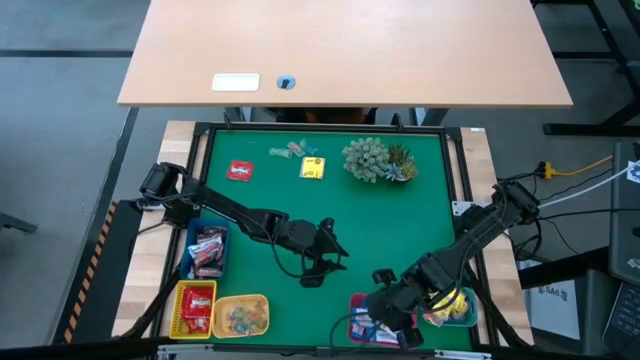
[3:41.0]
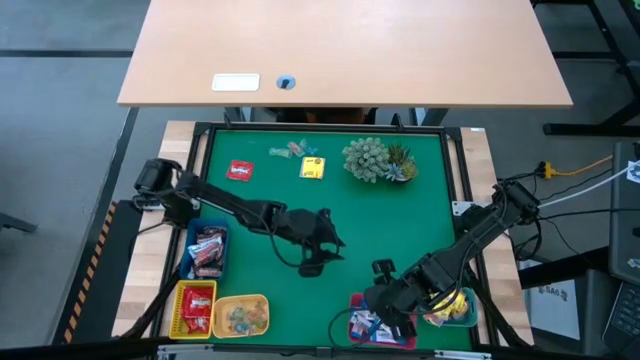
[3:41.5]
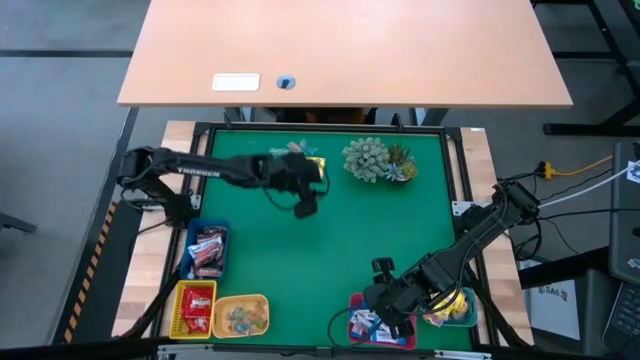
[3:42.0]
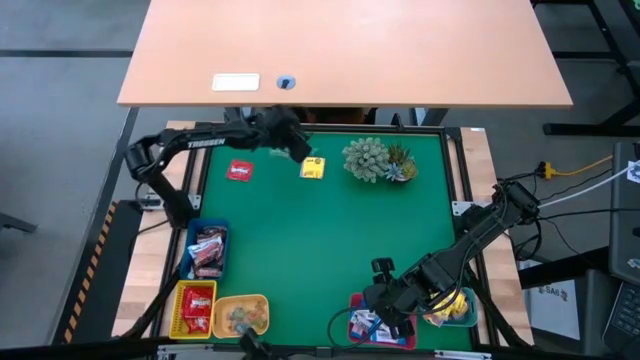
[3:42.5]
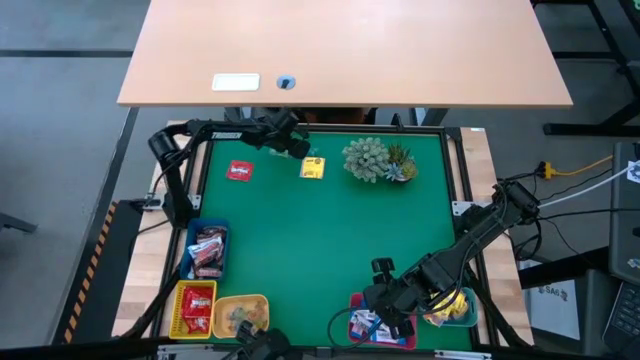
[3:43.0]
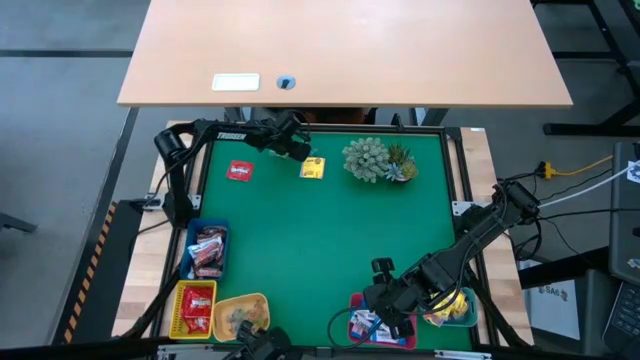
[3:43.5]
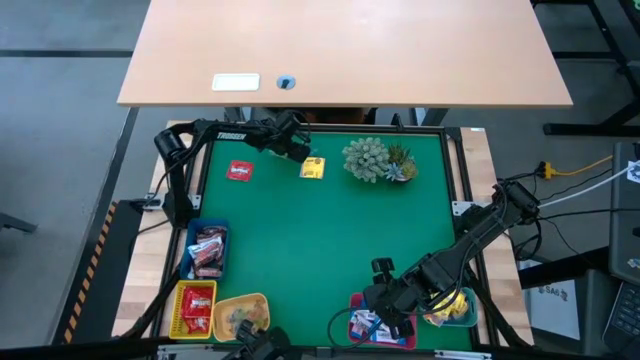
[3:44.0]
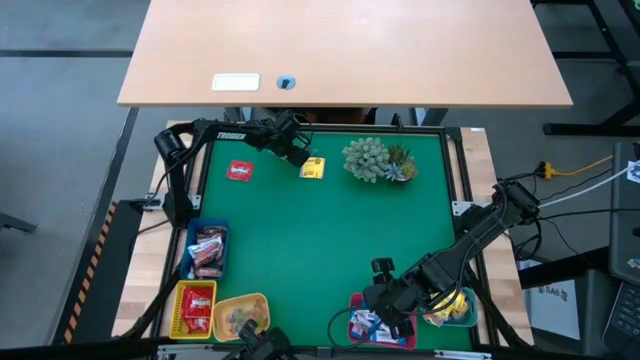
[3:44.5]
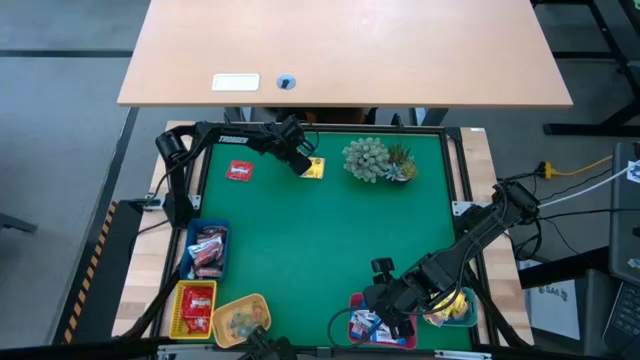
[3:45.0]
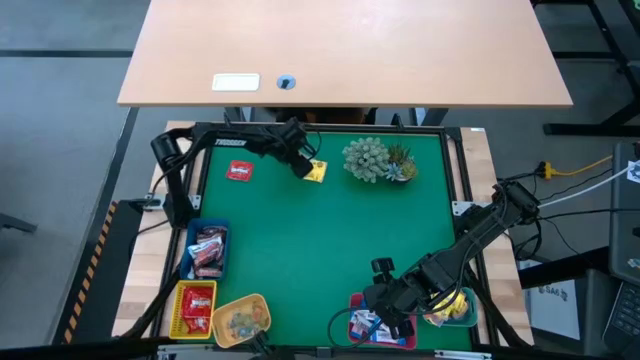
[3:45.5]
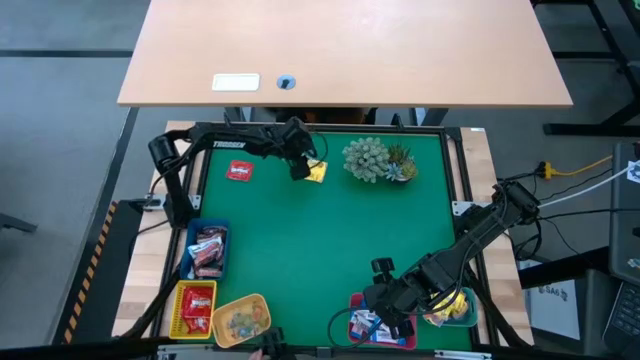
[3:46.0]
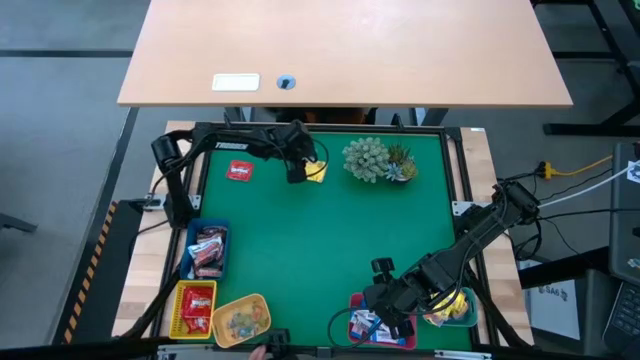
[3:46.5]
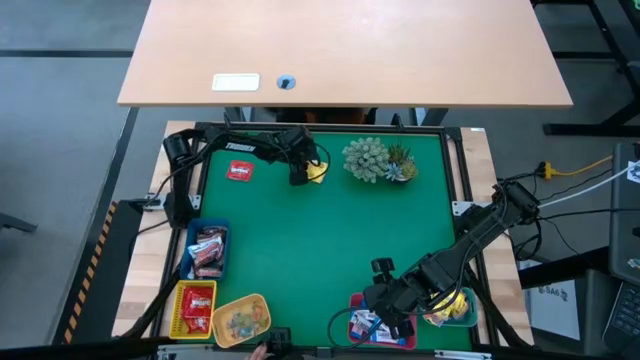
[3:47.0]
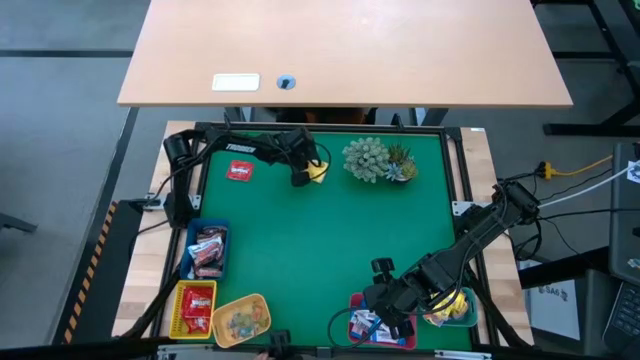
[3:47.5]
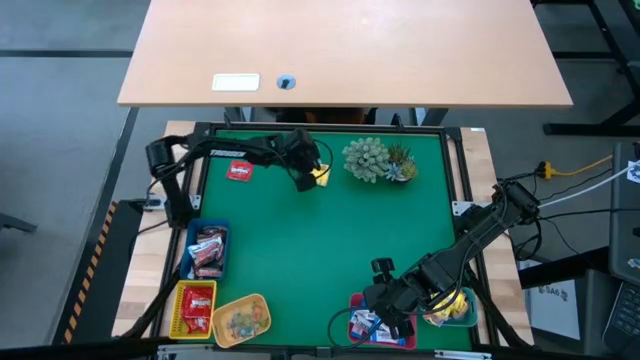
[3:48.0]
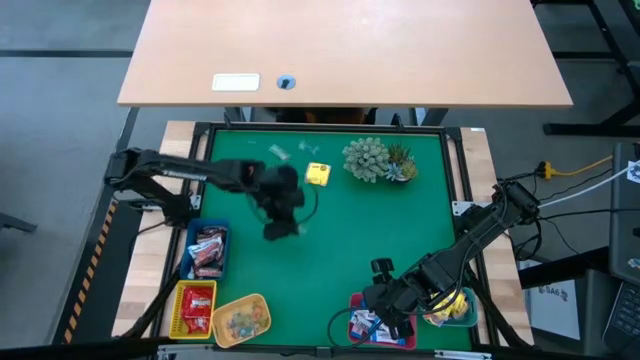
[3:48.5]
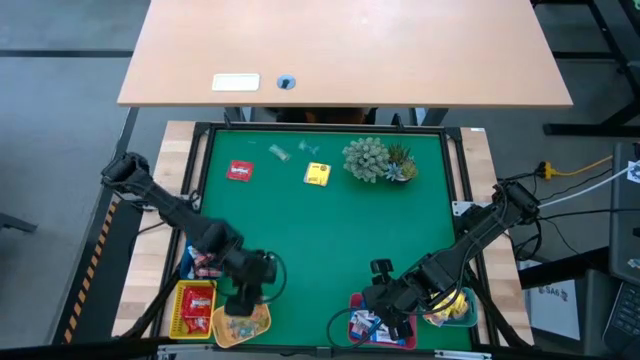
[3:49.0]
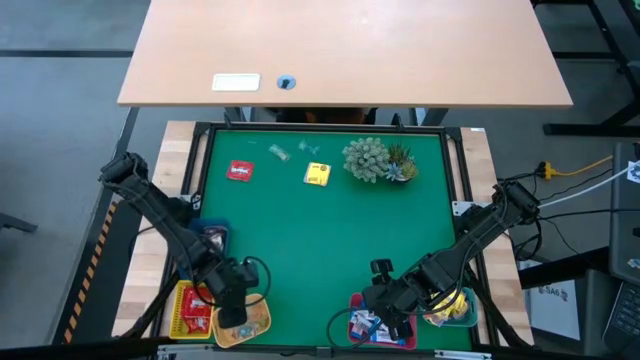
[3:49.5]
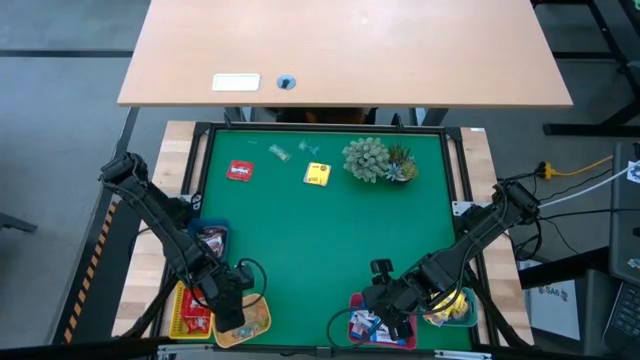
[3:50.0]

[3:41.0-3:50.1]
Task: Sort candy
Put the transparent candy into the orange bin

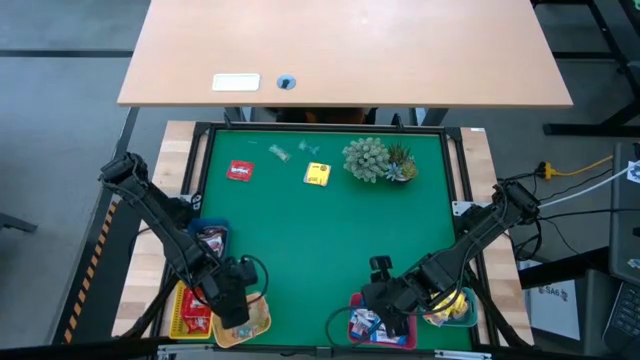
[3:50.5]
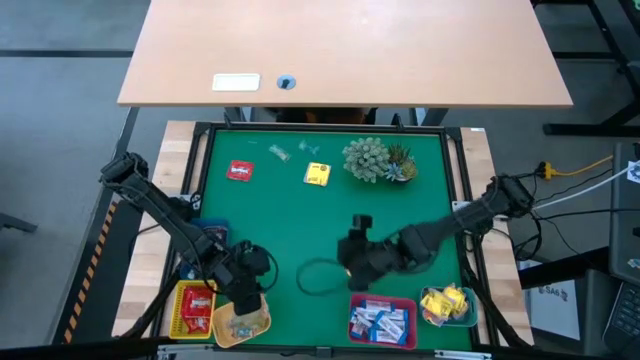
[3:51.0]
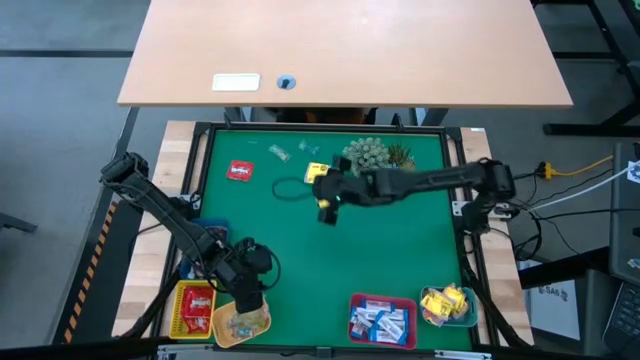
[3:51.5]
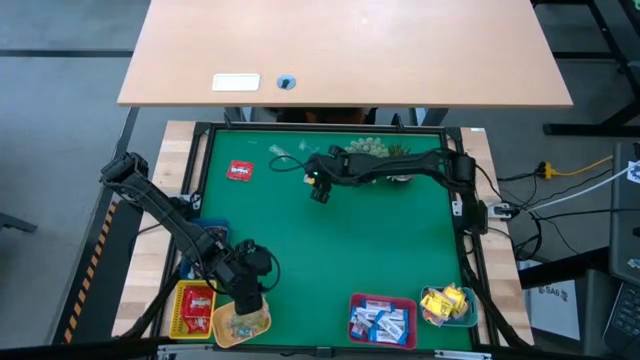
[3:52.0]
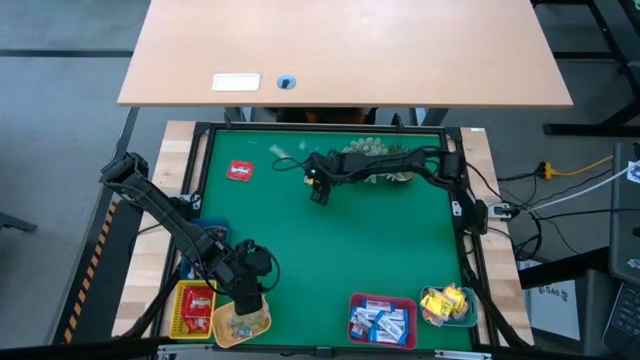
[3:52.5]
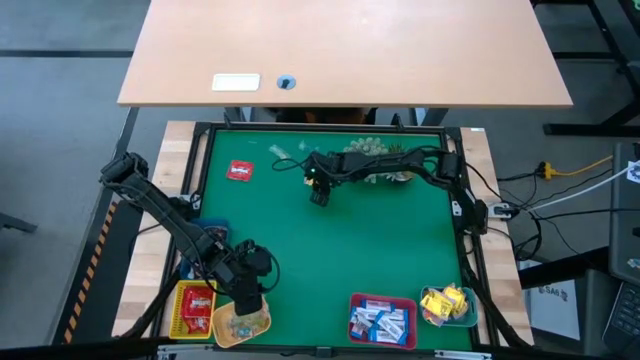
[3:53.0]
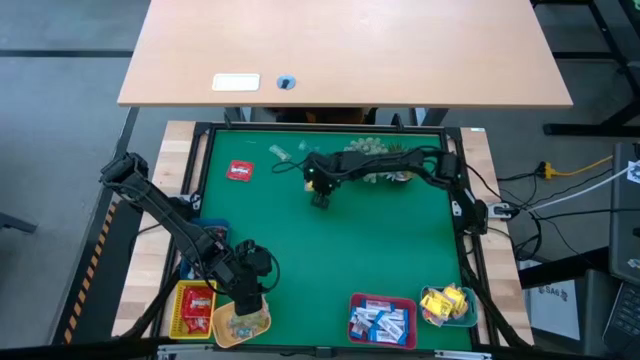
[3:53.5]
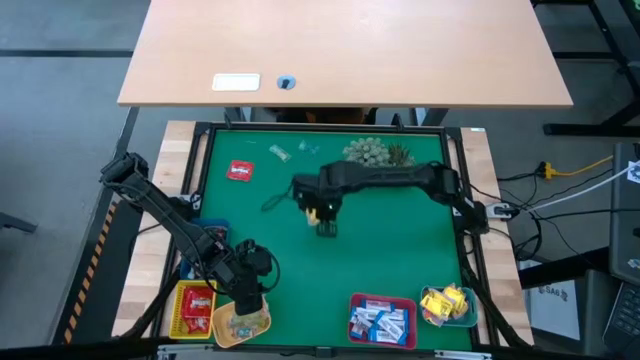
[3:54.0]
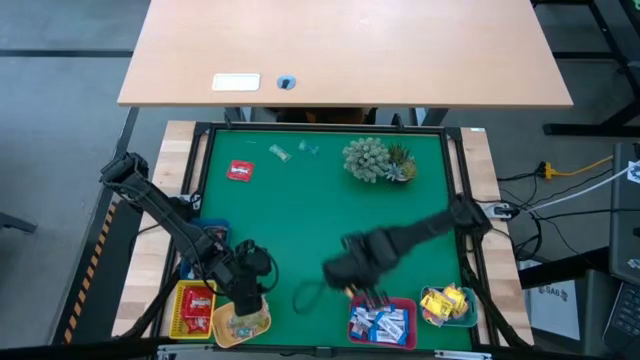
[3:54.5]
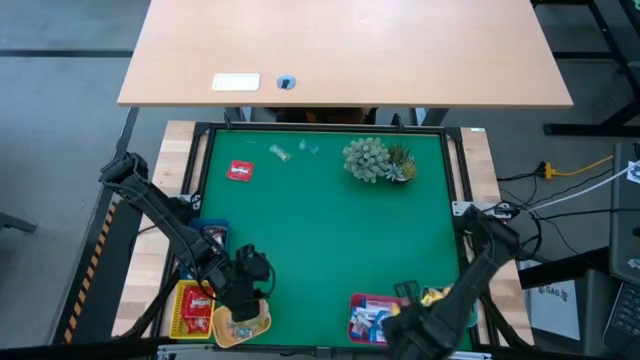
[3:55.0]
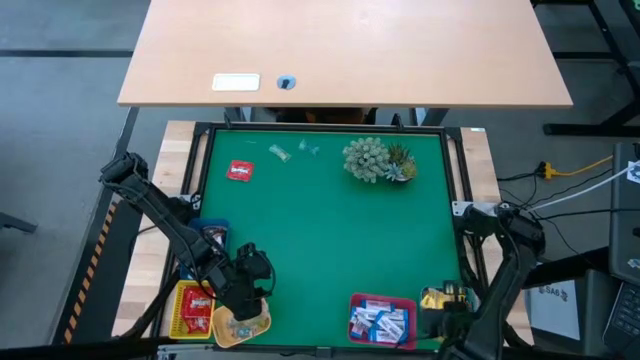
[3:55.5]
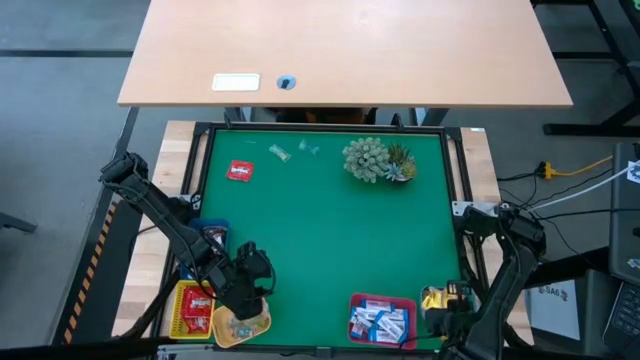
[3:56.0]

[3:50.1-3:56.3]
Put the yellow candy into the green bin

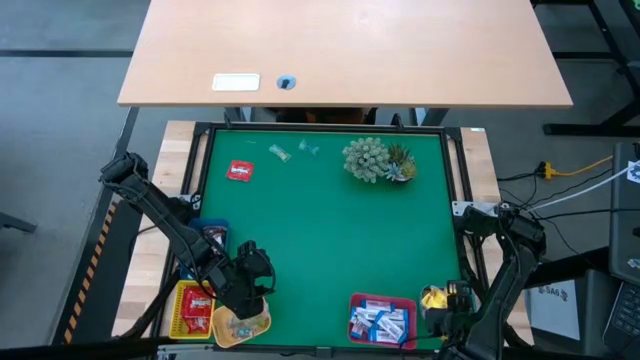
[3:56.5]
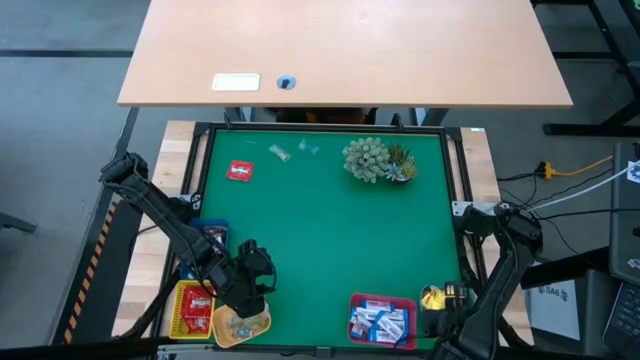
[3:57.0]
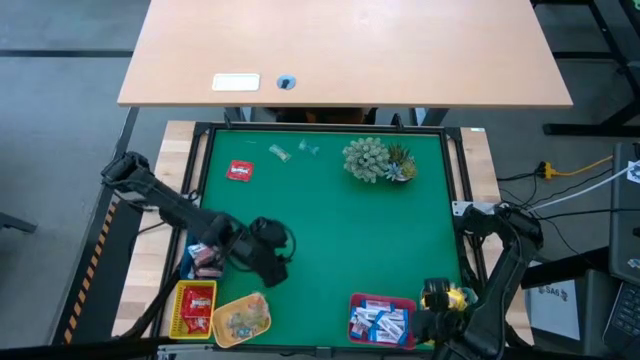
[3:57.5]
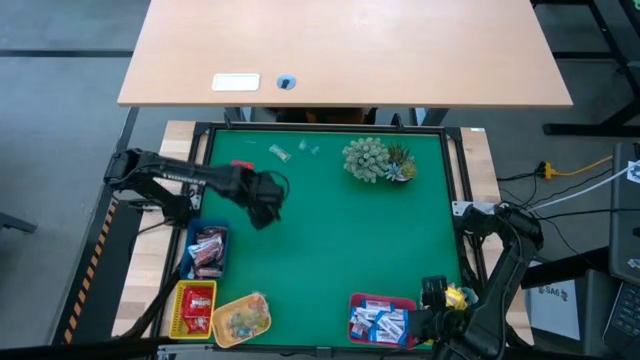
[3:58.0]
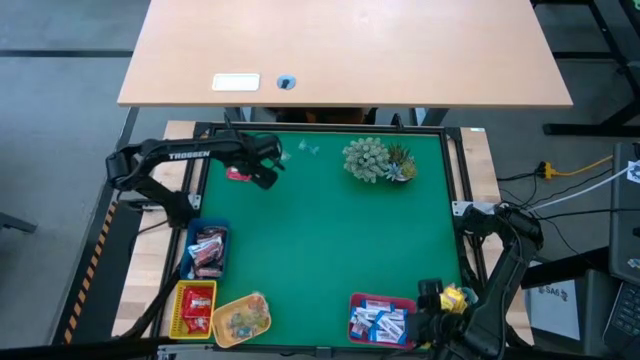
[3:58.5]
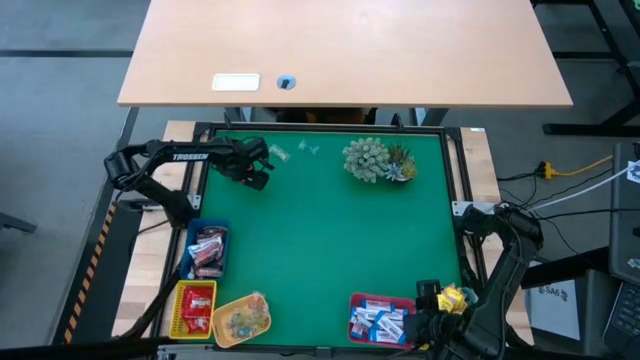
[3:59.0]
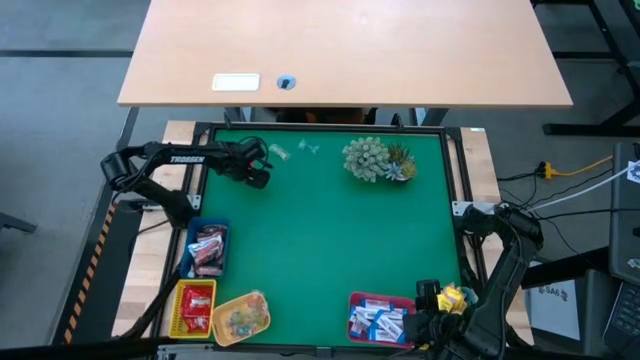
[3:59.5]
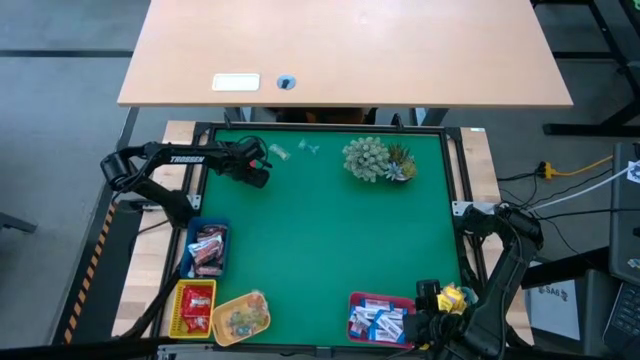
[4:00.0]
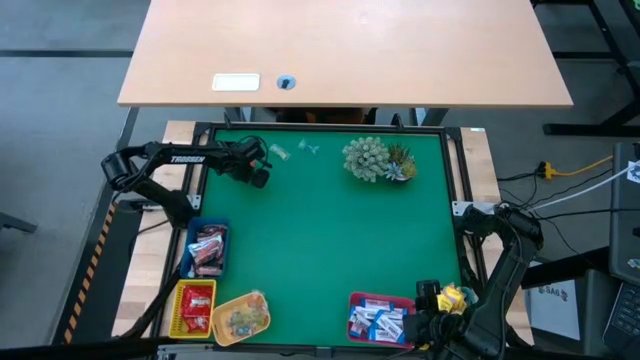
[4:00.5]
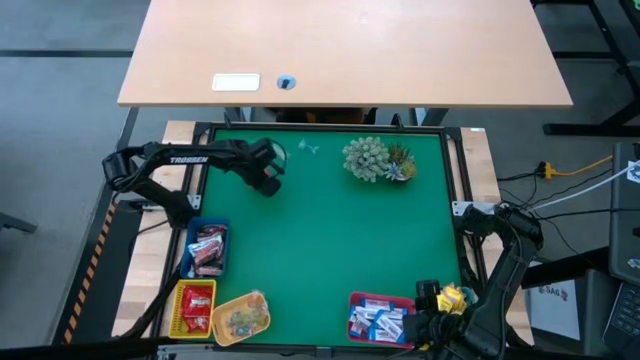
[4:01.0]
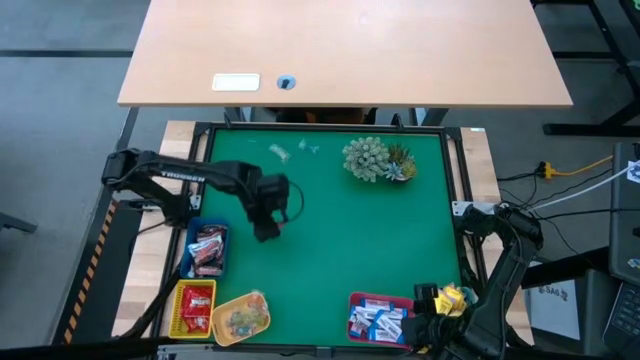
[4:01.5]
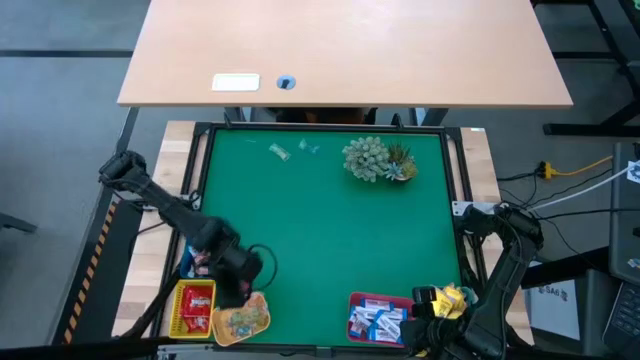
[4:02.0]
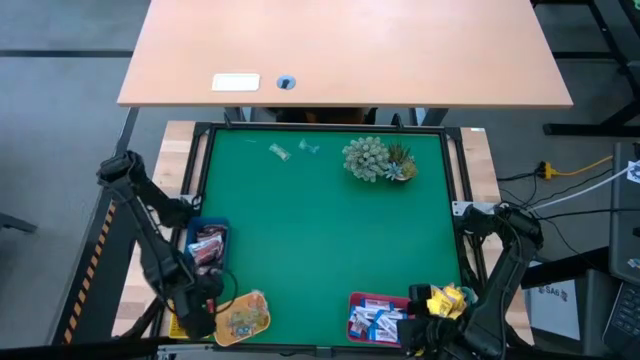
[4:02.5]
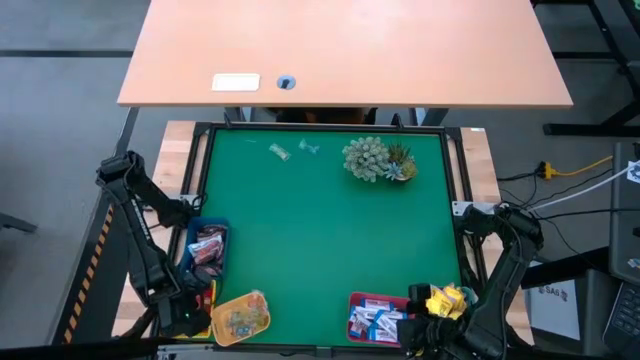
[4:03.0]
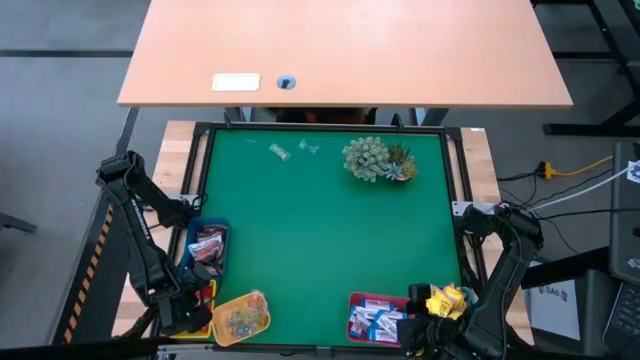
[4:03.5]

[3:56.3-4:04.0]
Put the red candy into the yellow bin
